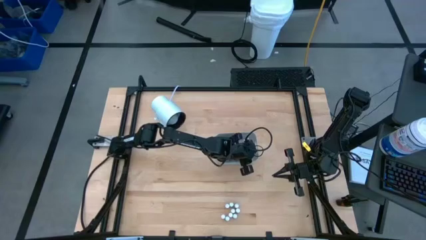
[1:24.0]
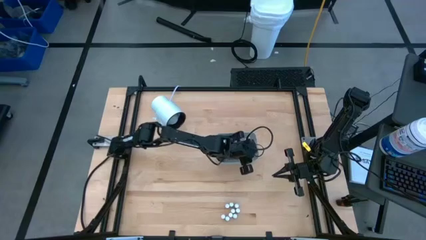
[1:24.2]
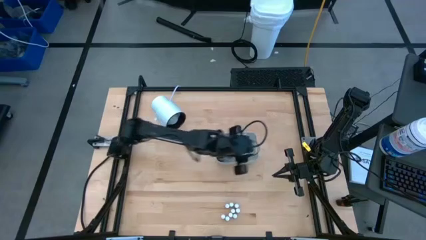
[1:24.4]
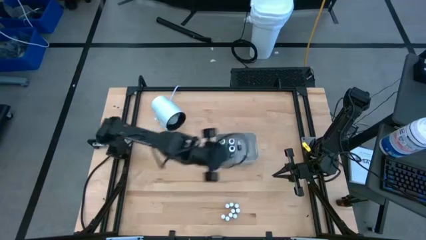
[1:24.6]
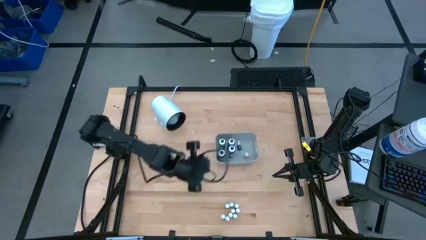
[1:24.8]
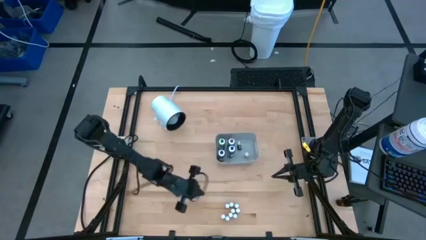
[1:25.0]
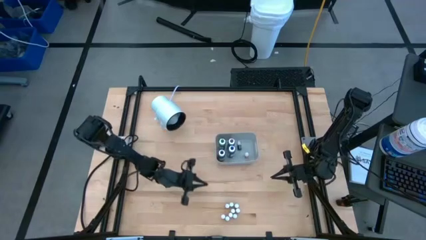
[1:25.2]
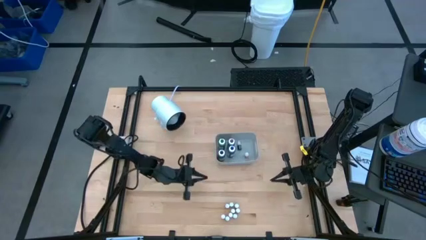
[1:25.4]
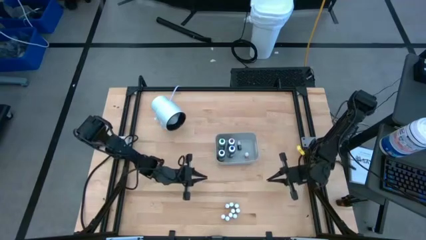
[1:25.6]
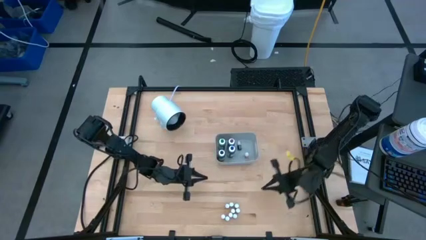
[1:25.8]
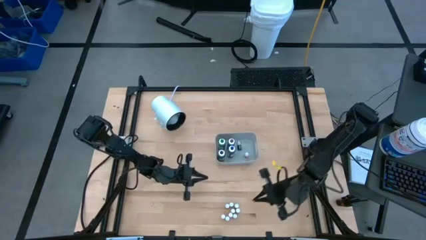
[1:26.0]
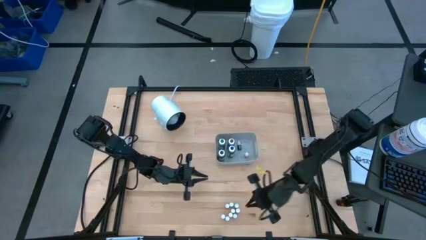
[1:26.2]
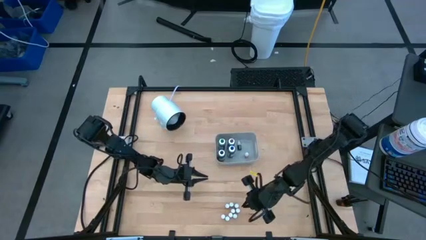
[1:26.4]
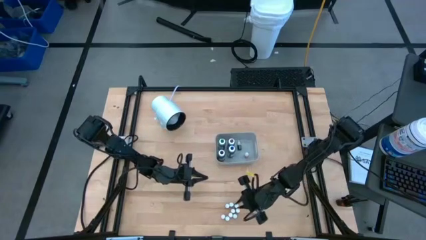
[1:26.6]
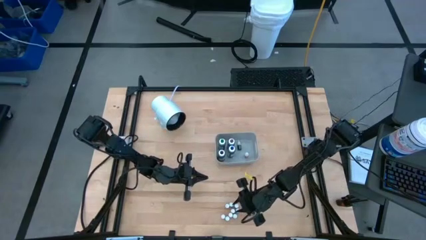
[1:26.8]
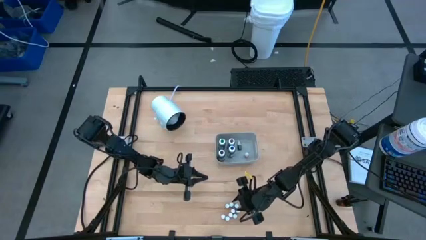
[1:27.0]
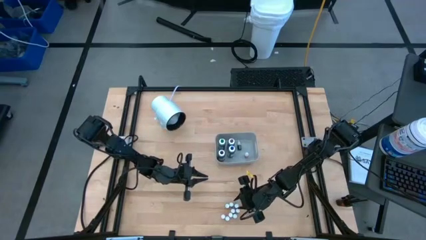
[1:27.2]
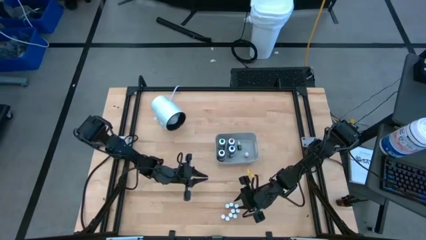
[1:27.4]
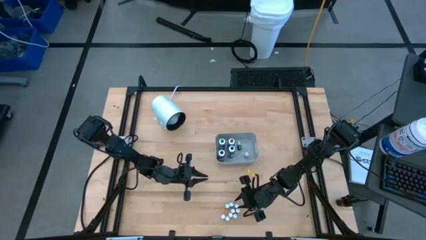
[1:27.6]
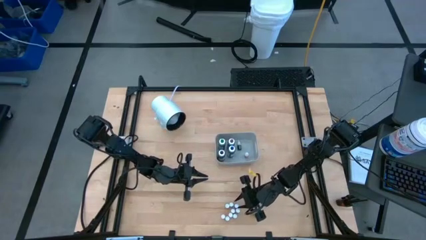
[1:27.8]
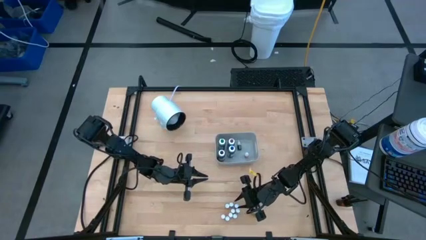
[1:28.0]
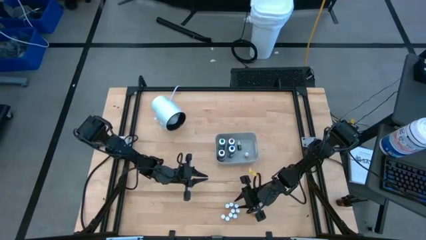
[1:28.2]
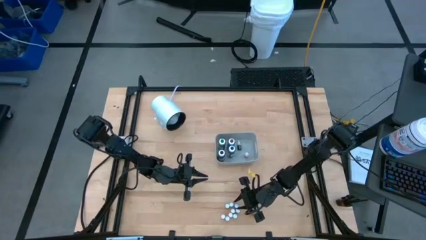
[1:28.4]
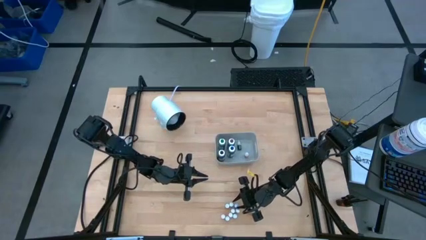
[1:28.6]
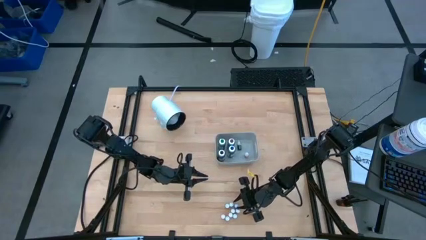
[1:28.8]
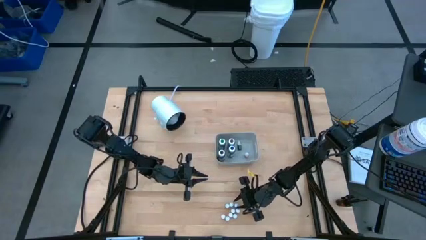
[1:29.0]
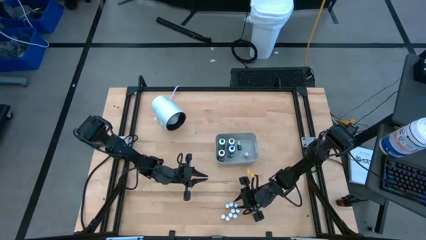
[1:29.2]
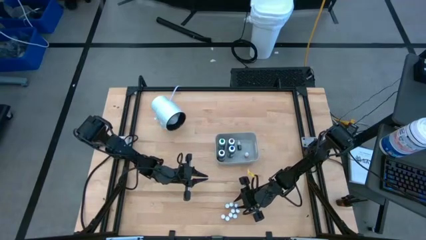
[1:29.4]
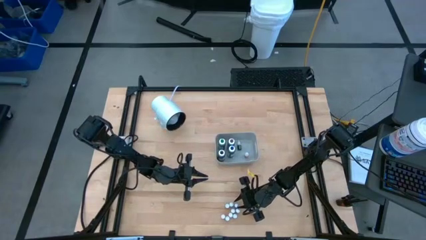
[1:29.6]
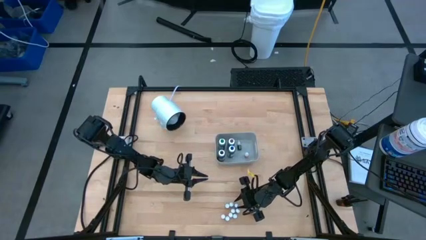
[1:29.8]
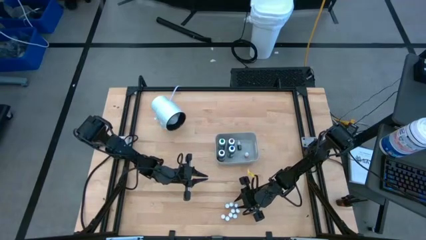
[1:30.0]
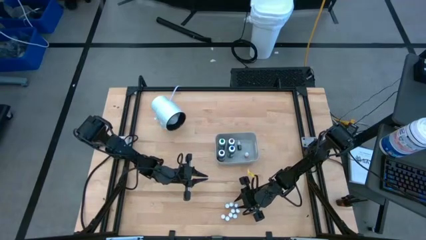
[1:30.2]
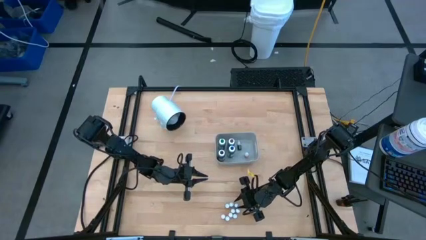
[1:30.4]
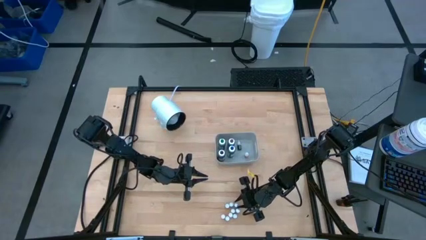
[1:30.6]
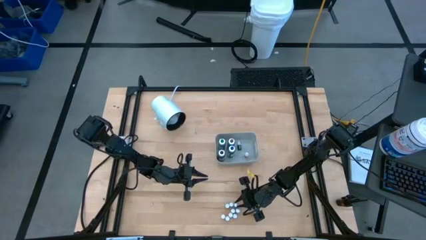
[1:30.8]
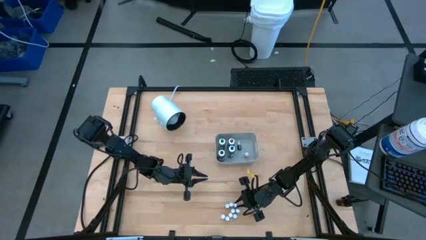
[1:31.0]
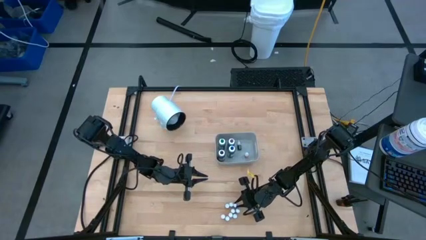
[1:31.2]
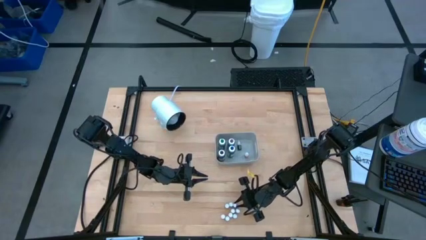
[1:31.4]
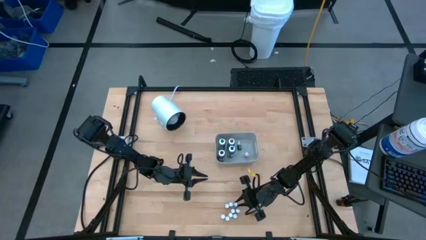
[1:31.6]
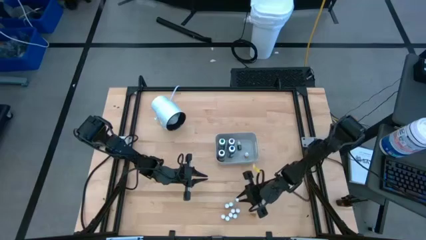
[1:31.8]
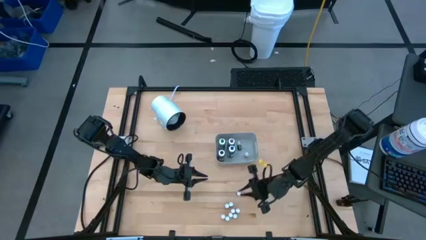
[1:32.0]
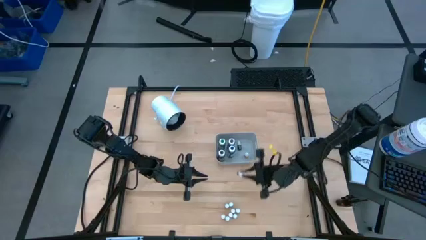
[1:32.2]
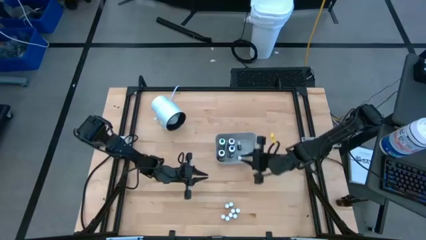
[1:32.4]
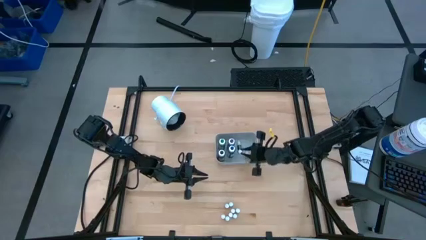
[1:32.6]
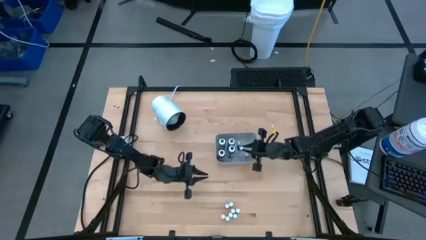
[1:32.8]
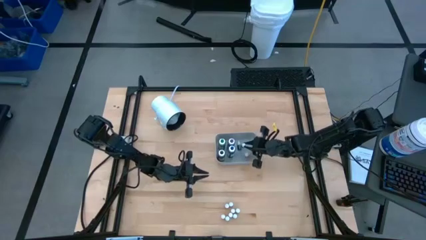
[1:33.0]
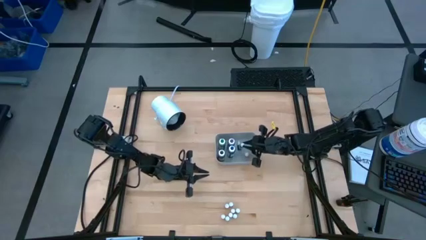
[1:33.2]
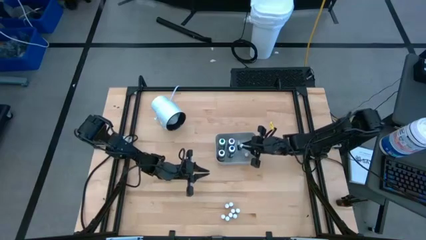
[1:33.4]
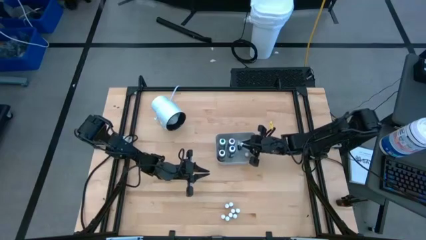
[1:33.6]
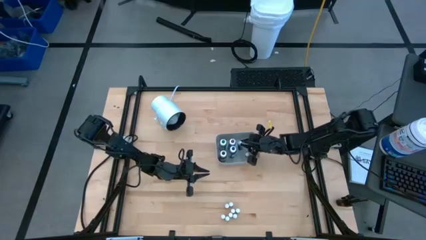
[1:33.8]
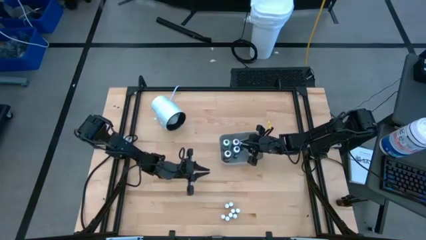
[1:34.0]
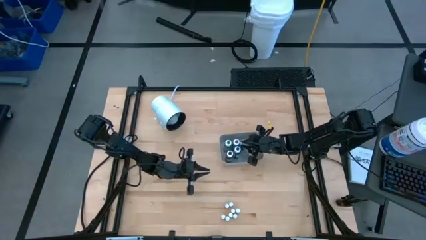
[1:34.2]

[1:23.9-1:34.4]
Task: Pick & Place food coloring
Put the small black food coloring bottle into the gray bin

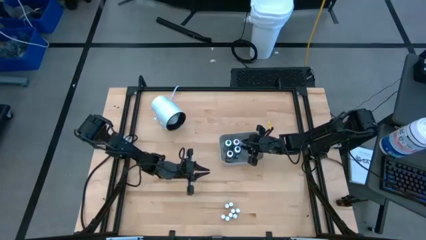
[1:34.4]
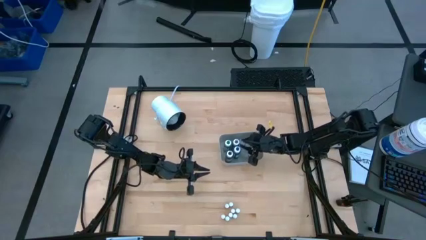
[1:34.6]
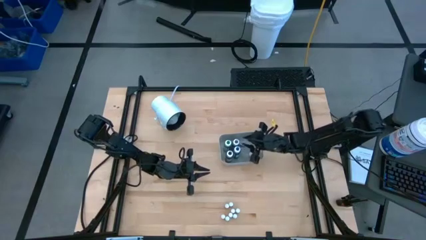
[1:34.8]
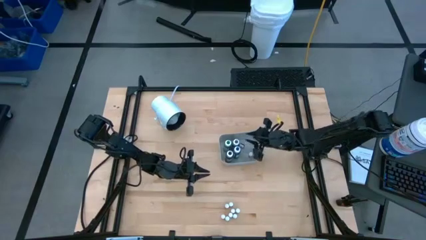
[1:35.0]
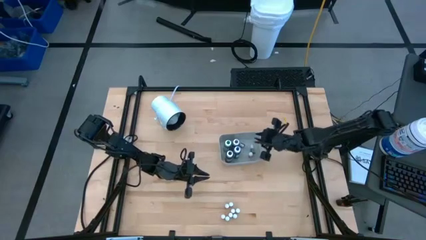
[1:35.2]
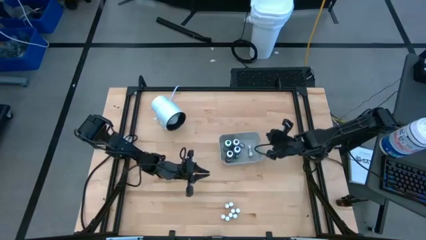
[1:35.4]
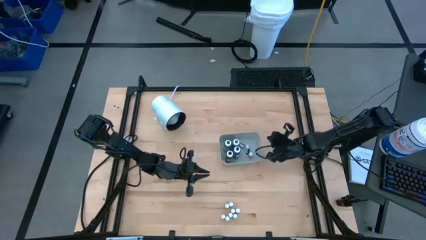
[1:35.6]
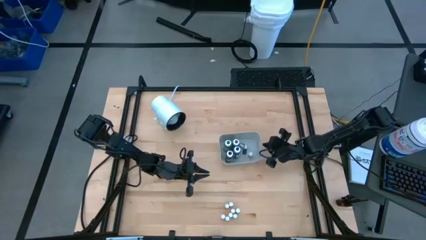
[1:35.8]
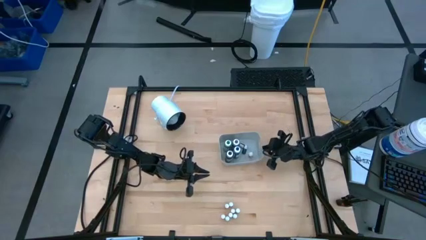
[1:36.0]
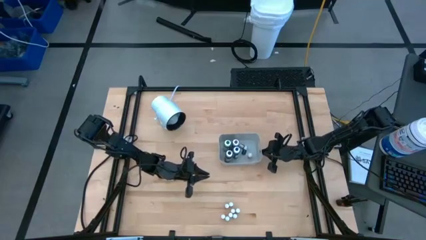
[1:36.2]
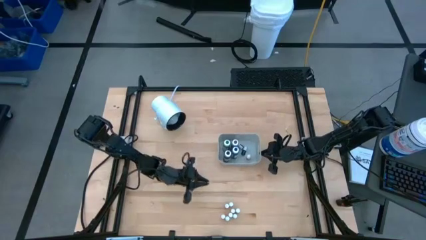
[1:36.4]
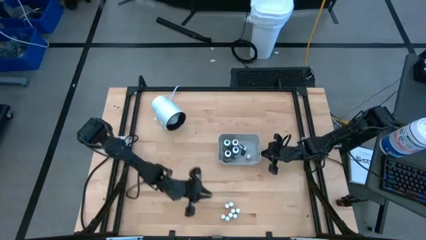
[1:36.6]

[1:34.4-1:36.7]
Adjust the gray bin on the table

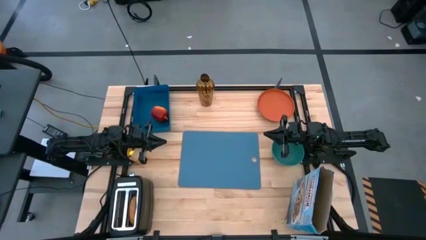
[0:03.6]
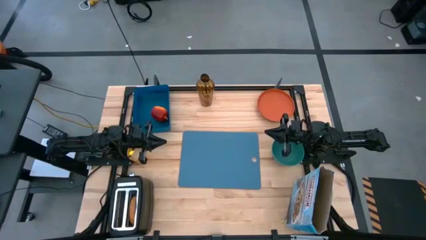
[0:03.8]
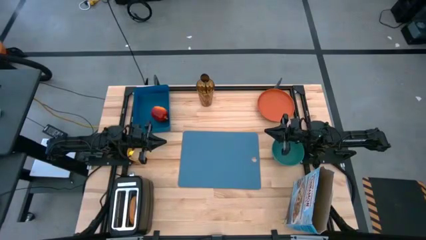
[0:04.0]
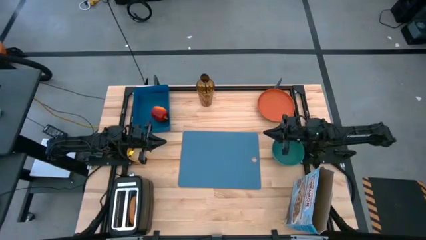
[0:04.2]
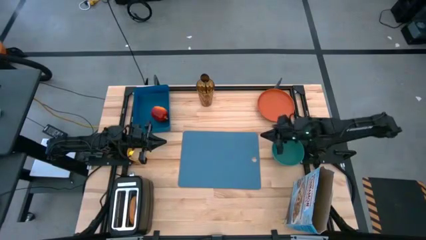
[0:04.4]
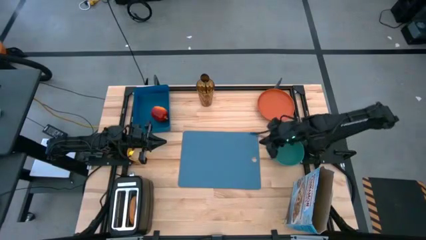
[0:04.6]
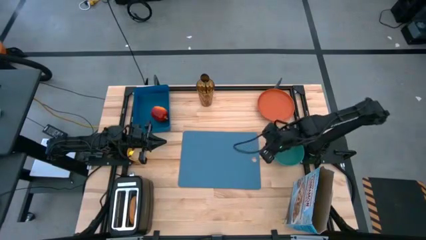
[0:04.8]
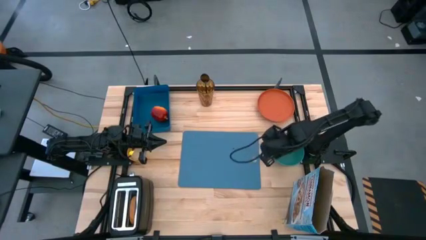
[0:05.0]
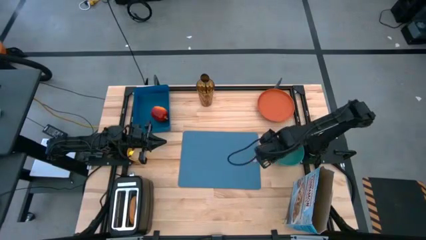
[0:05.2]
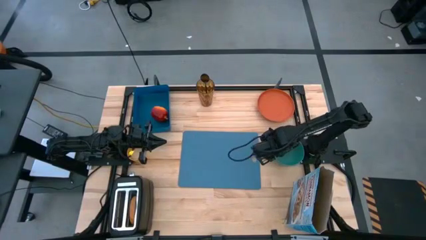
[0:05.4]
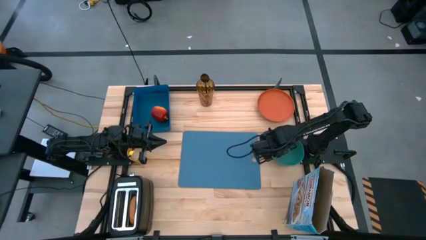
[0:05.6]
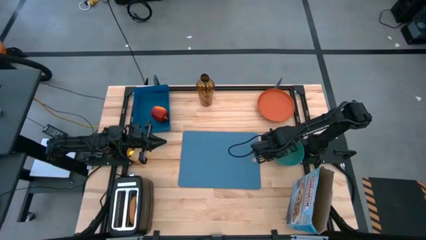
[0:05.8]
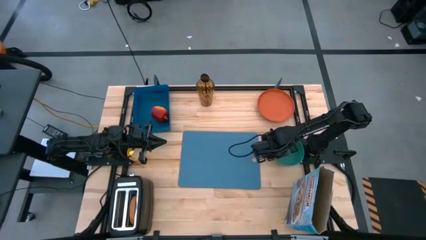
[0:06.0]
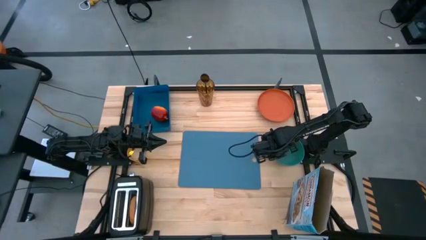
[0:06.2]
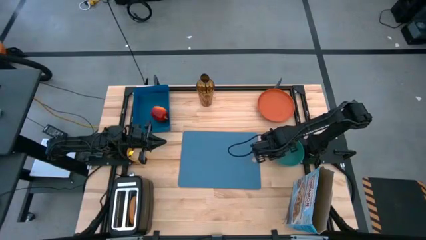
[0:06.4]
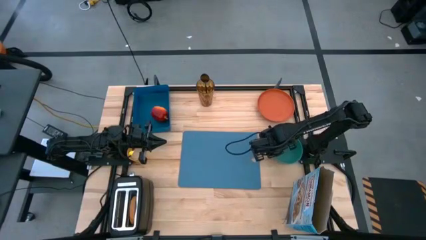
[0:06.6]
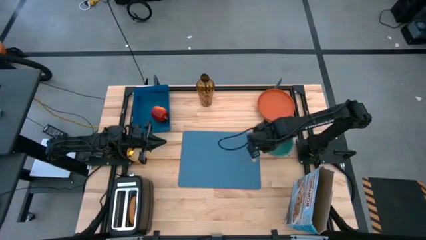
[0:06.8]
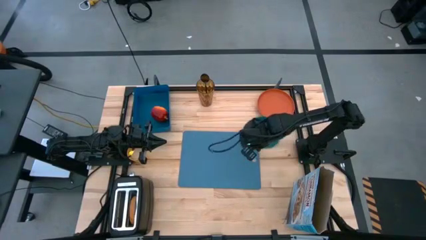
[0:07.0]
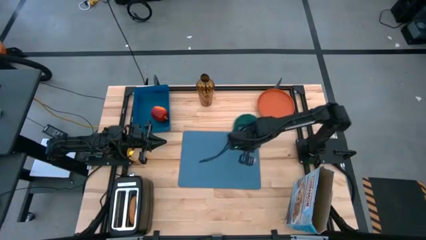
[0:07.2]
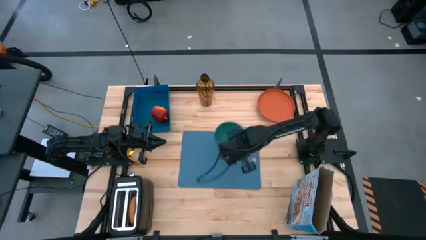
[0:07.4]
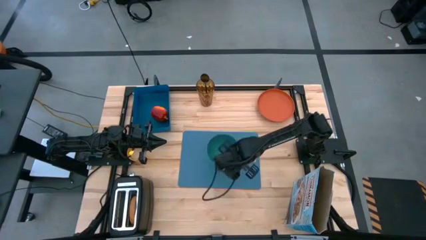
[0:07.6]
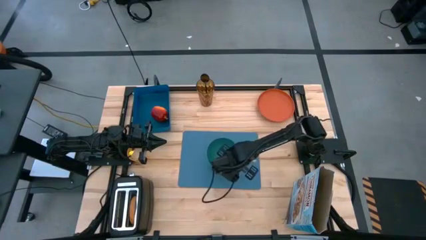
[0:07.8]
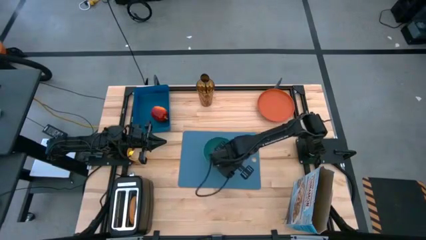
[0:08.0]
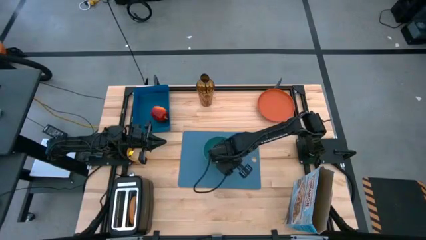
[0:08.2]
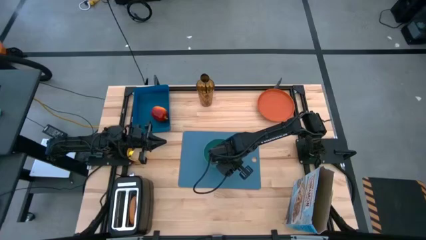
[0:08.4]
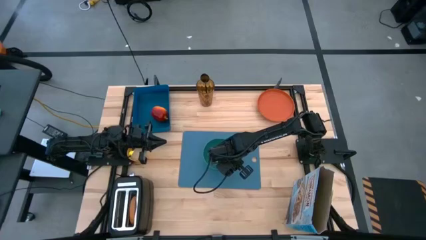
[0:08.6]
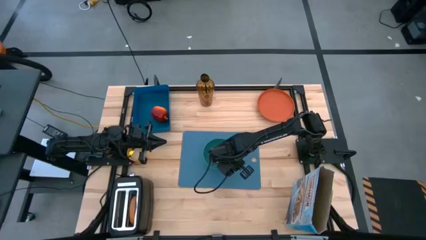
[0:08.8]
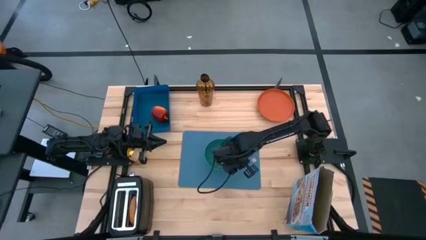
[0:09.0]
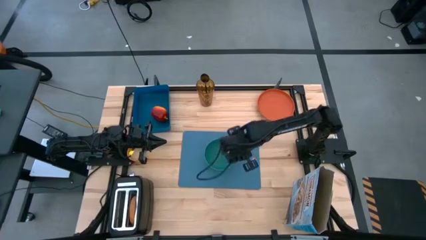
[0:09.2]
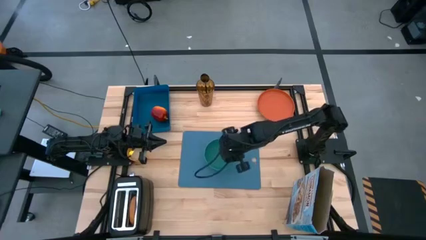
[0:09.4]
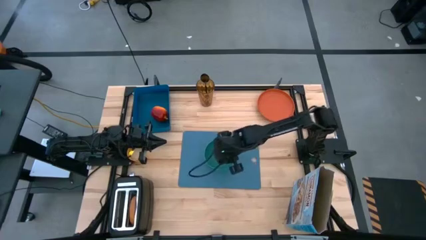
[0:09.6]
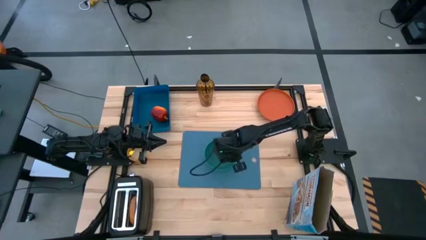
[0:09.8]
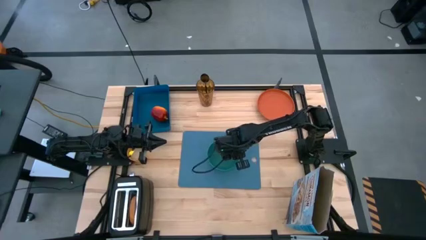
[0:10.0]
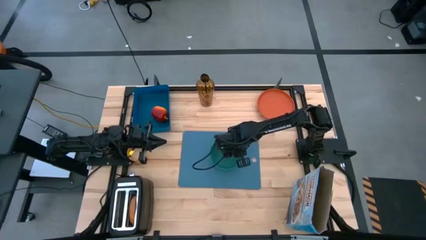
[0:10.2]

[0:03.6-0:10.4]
Task: Arrange a breakfast setting
Put the green bowl on the blue cutting board
